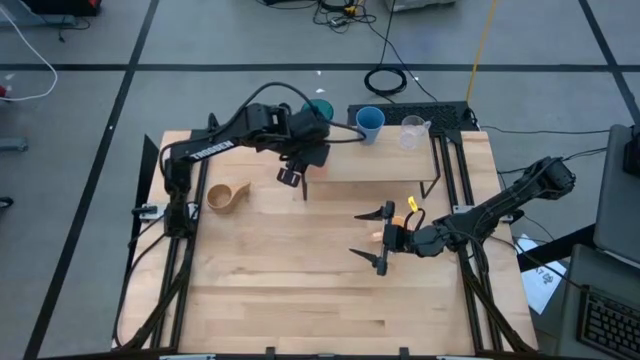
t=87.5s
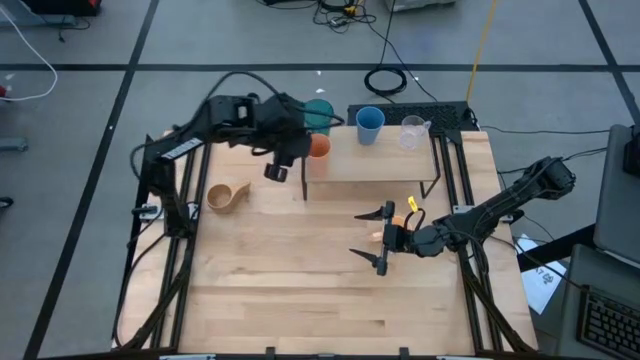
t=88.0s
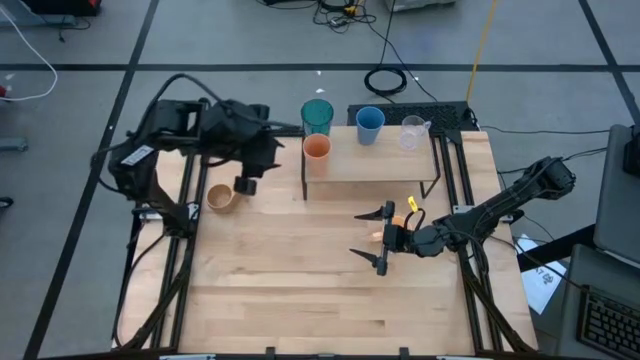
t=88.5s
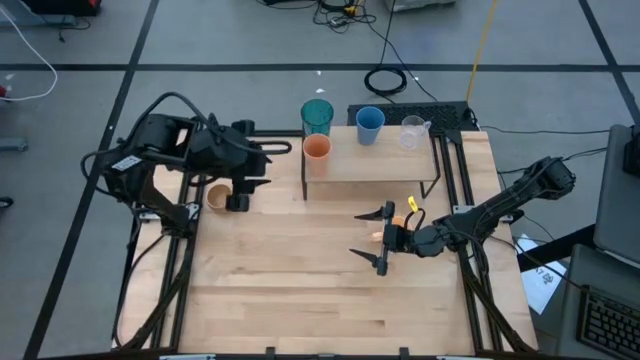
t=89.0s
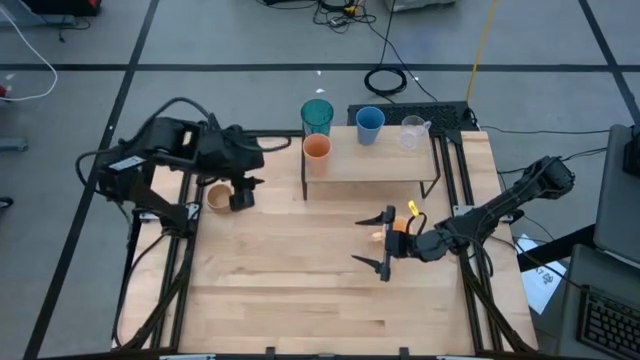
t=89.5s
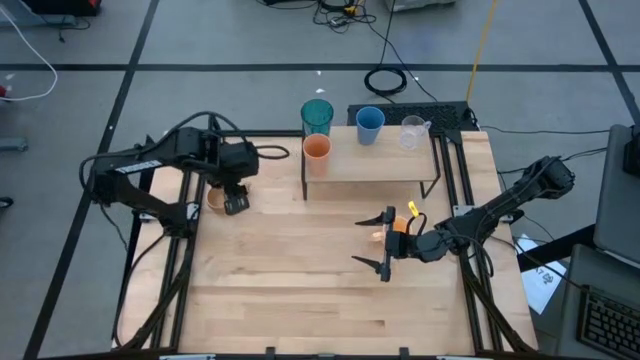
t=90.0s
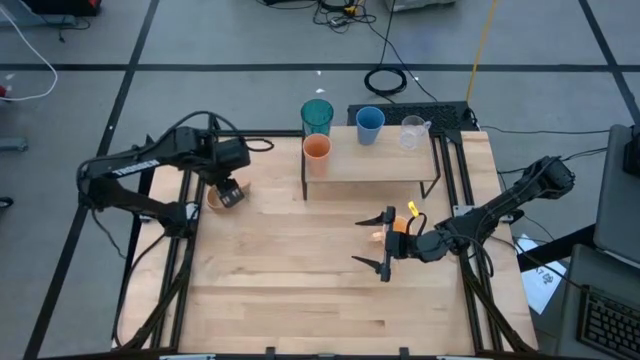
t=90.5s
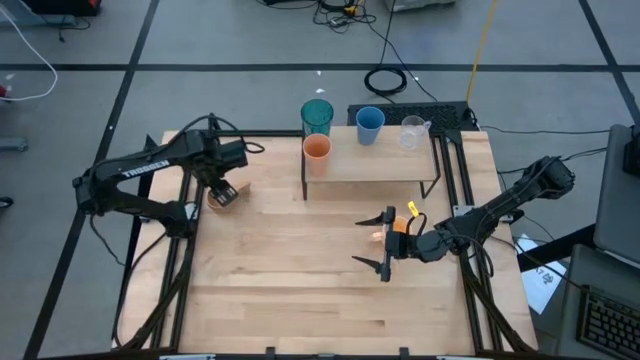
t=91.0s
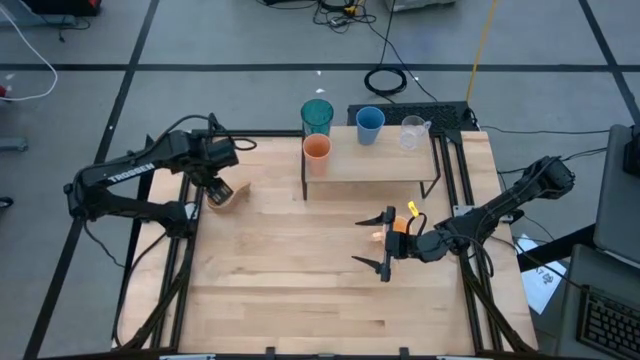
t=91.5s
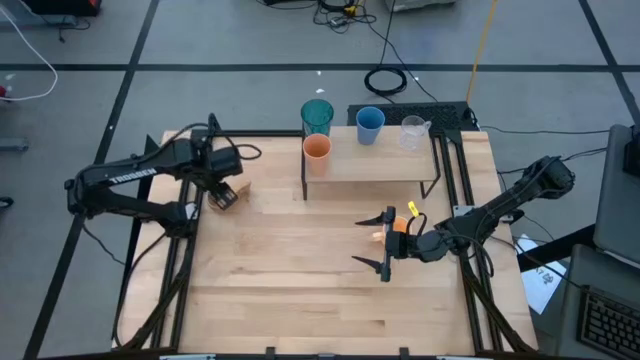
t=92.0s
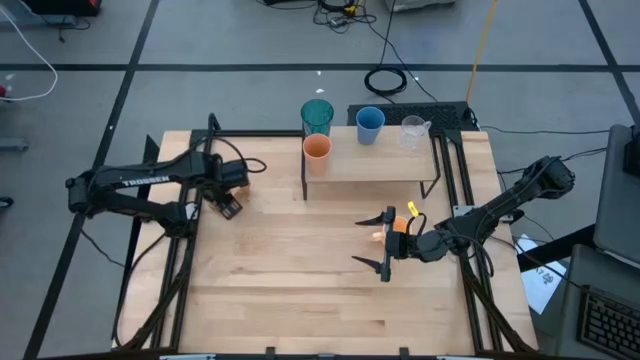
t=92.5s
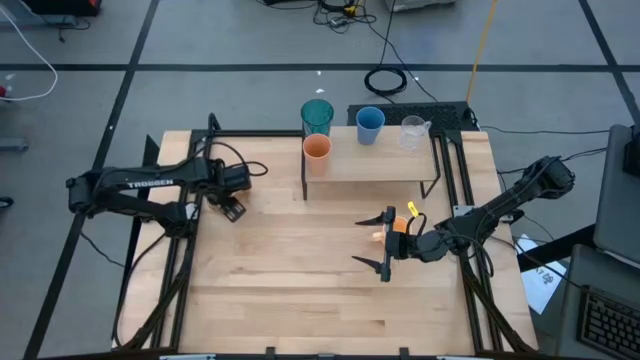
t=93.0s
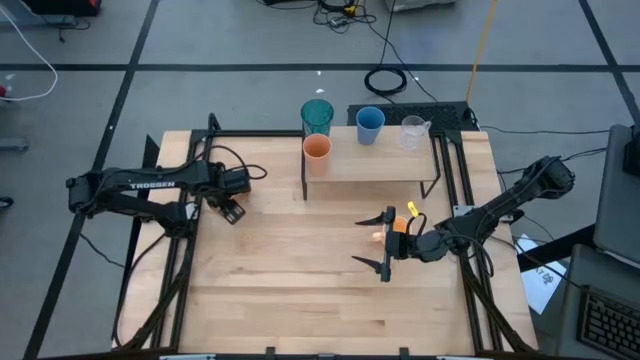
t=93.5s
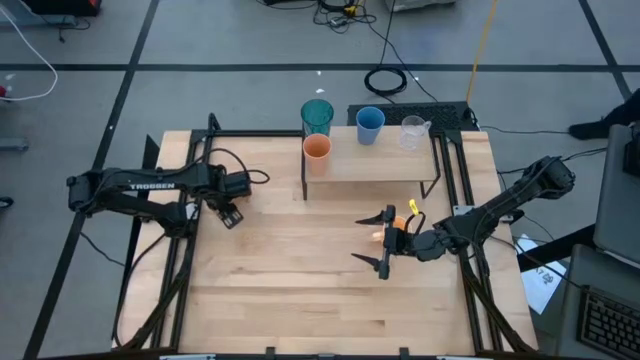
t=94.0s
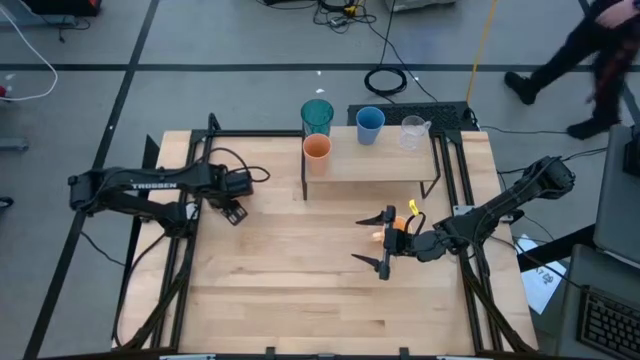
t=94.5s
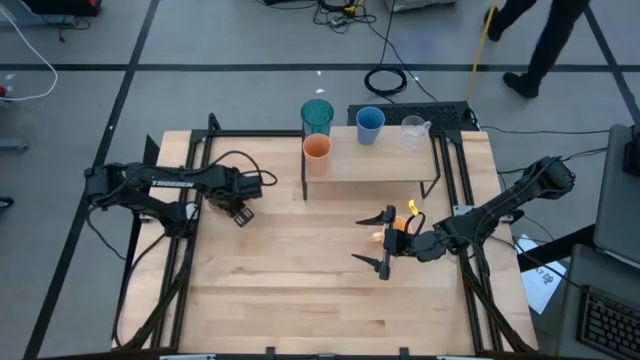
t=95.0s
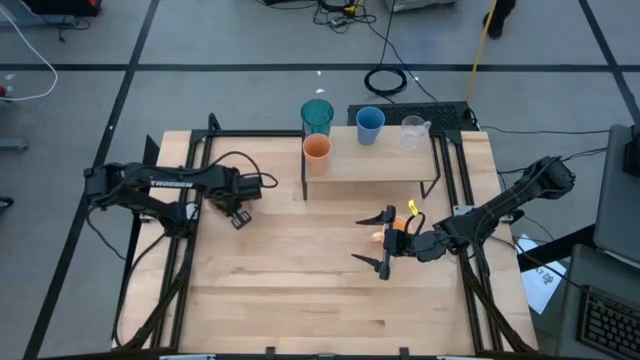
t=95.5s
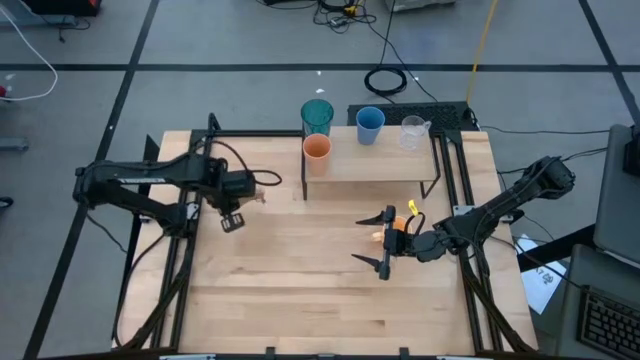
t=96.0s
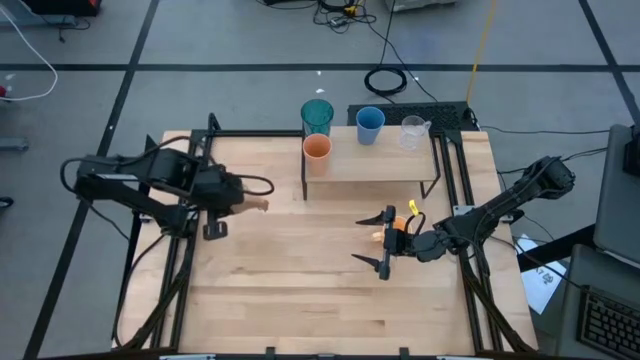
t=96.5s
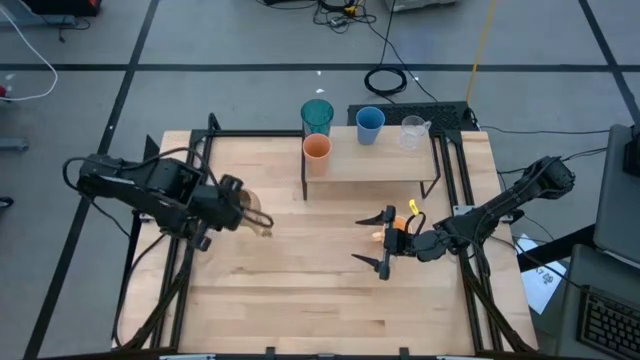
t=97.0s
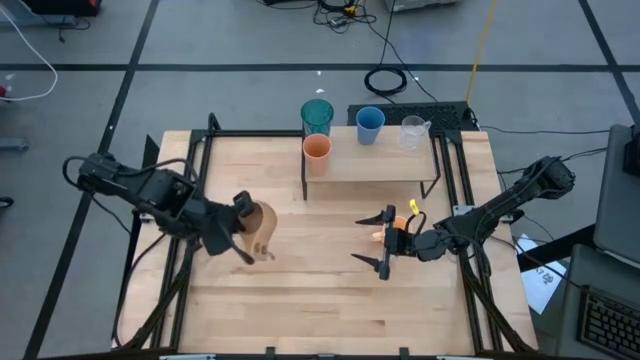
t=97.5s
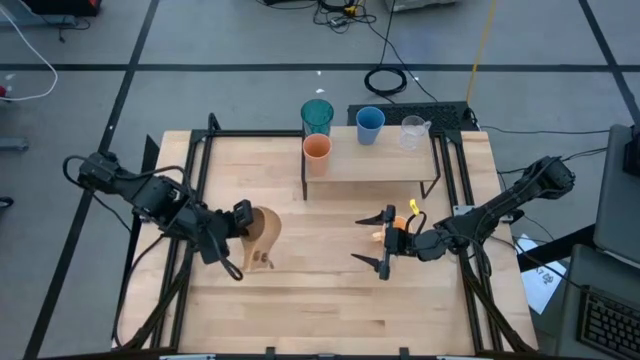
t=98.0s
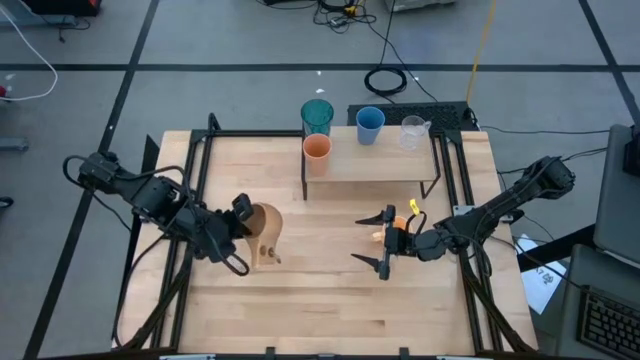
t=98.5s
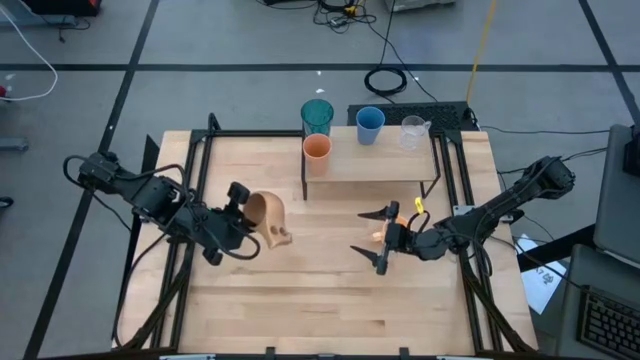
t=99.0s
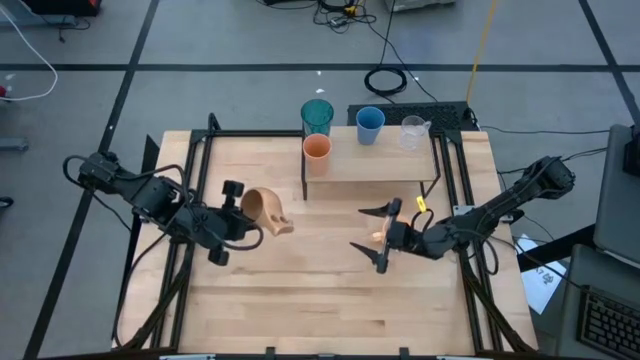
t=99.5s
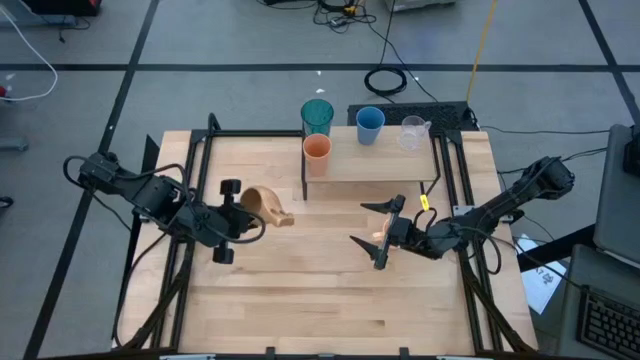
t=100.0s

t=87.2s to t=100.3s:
Task: Stack small to large cups/mugs on shelf
Put the wooden mug on the shelf
